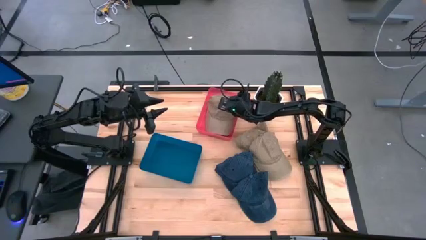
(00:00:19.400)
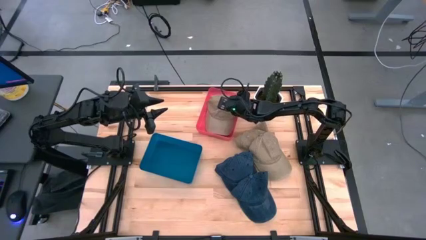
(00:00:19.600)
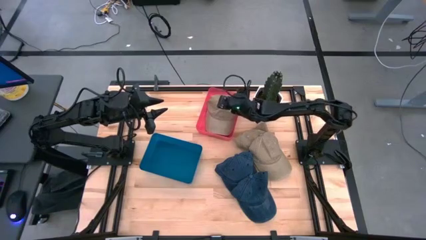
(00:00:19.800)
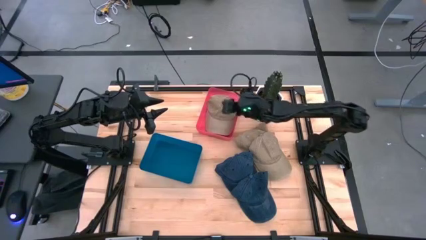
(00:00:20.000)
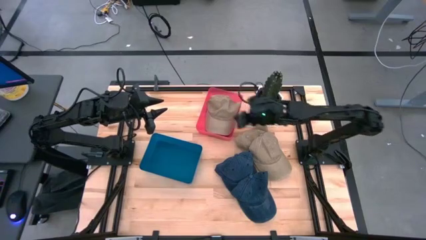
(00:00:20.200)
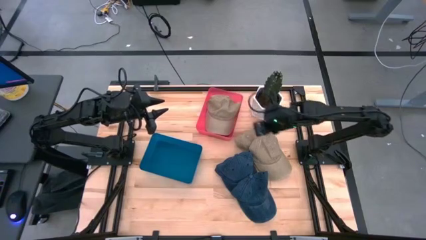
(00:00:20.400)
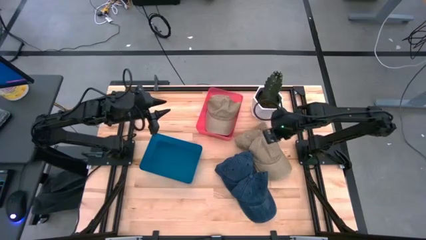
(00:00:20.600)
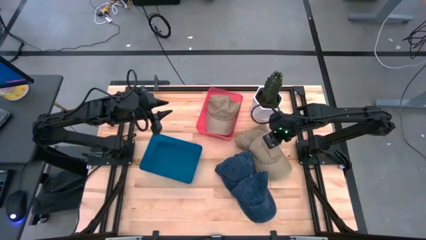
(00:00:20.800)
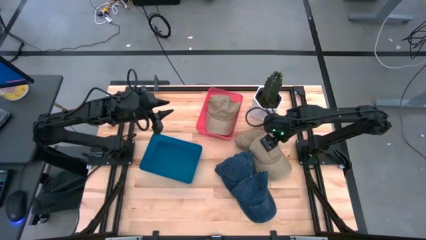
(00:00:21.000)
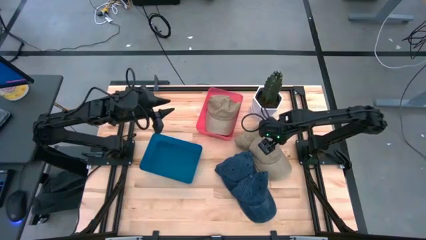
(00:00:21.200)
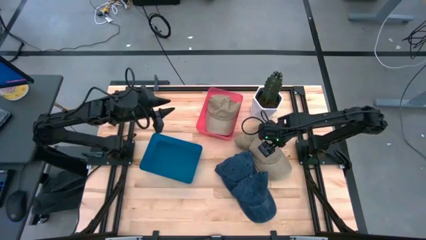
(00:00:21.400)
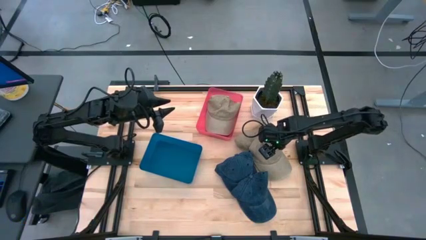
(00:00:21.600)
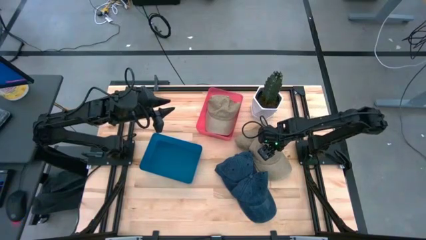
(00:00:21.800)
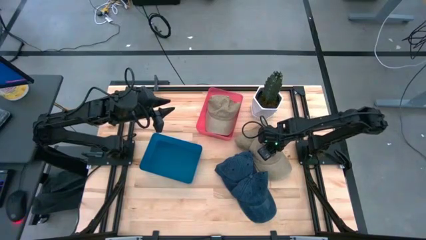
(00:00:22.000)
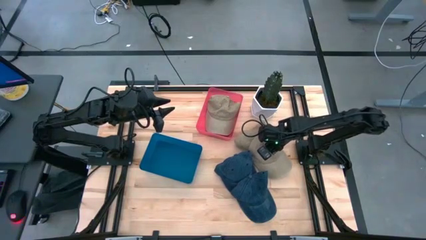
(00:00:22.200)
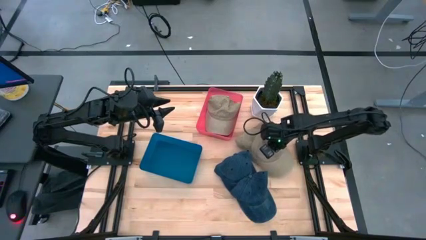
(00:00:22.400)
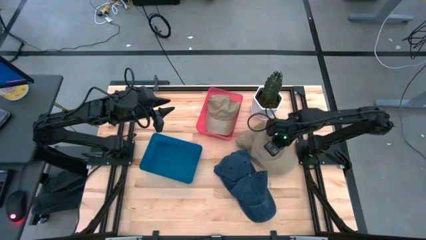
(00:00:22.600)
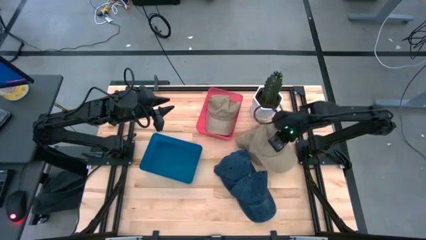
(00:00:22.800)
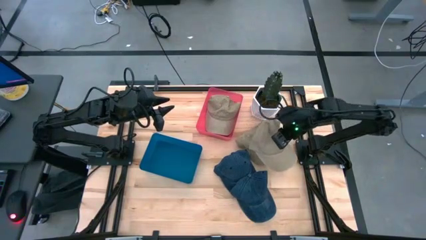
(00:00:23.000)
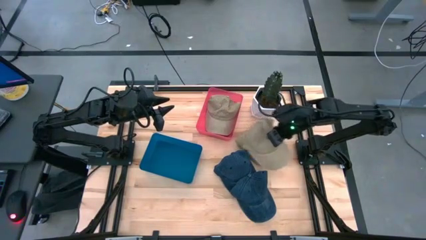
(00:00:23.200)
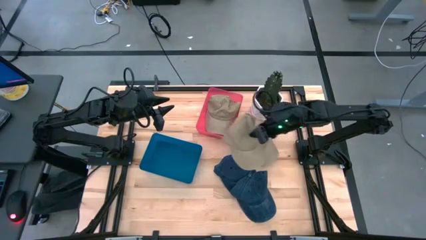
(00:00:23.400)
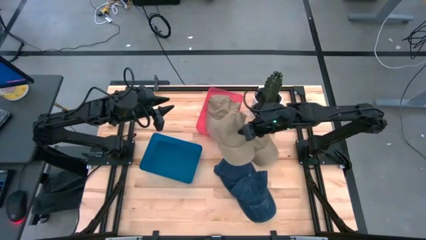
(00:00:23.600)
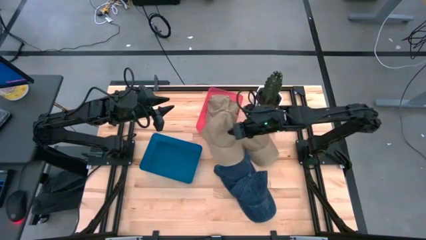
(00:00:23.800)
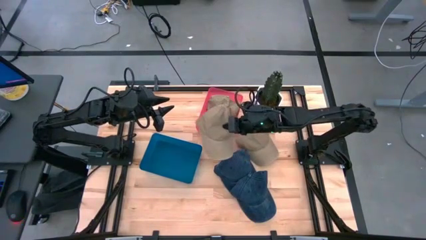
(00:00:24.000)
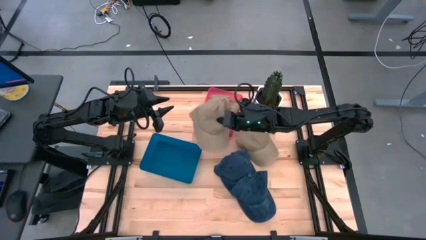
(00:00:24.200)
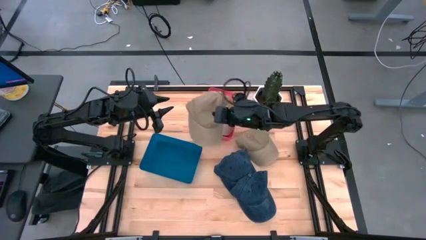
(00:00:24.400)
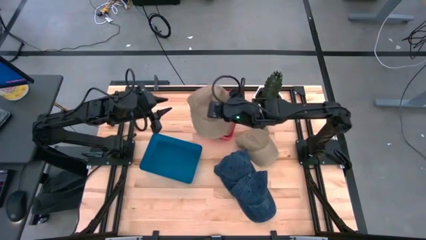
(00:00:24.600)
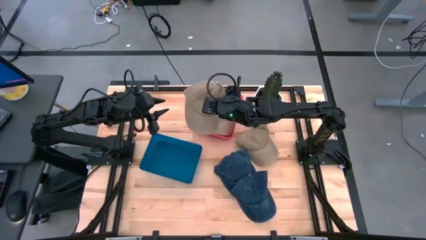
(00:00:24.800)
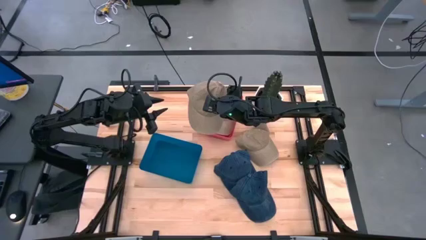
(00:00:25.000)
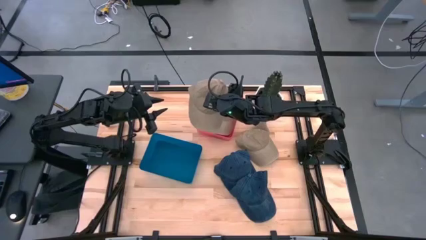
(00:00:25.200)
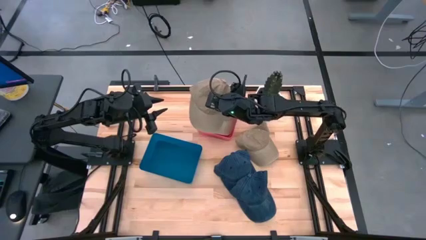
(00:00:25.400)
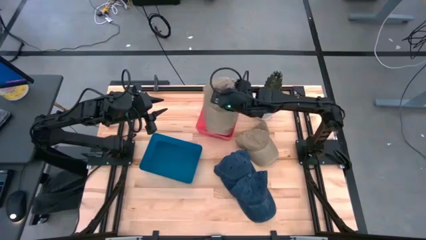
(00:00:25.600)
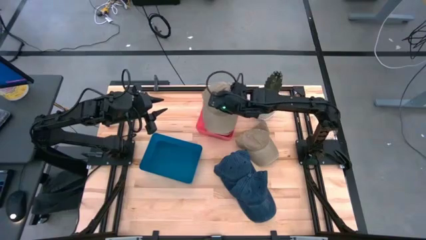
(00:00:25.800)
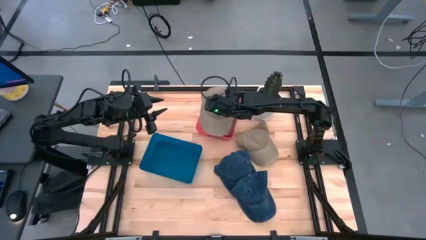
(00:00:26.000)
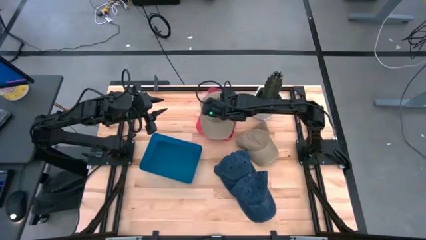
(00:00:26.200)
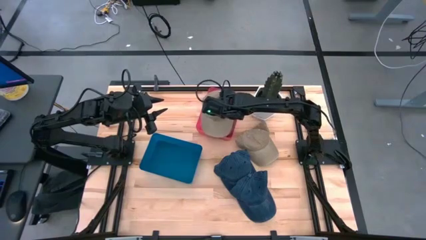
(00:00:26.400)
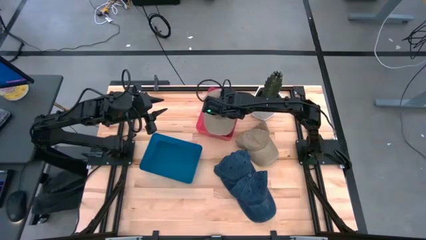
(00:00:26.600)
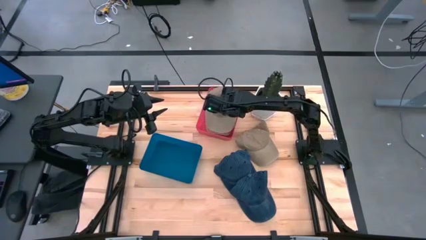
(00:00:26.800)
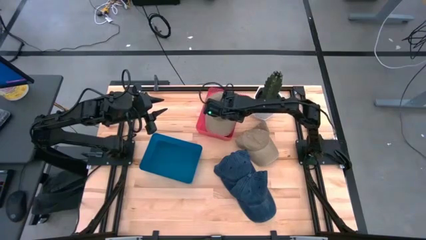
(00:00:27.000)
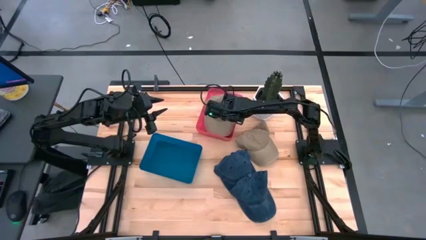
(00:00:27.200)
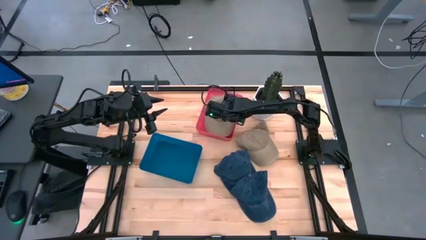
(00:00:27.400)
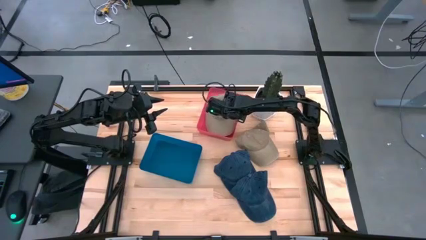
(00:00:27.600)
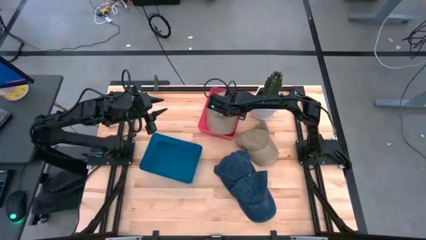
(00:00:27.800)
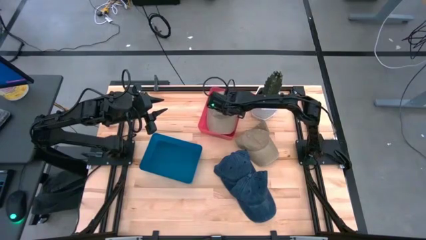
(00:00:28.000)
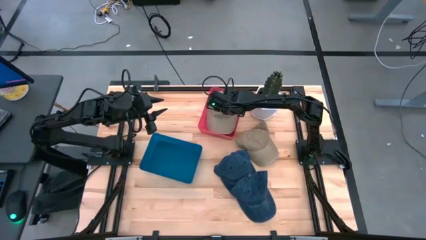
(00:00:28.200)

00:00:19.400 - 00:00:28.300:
Task: Pick & Place hat
Put the bottom brown cap into the pink bin

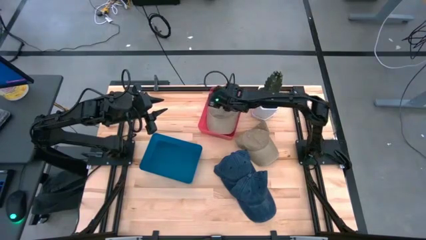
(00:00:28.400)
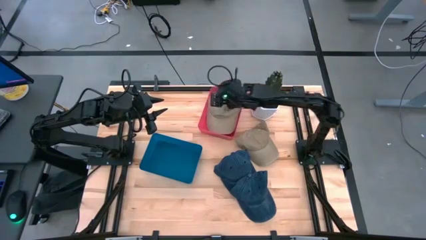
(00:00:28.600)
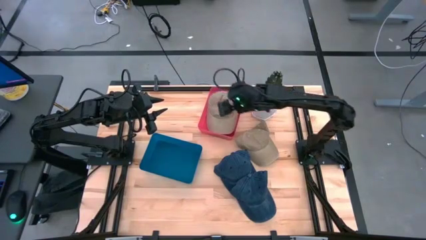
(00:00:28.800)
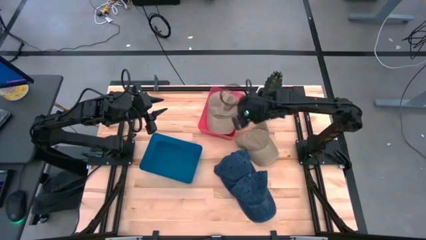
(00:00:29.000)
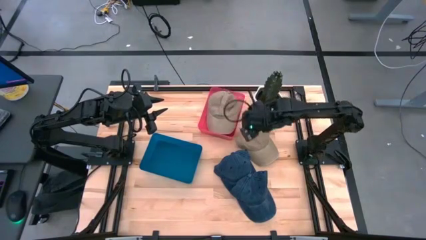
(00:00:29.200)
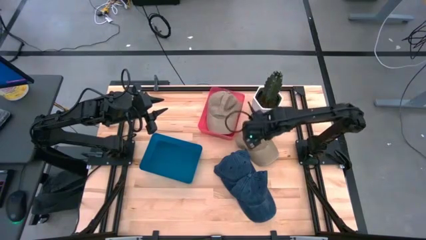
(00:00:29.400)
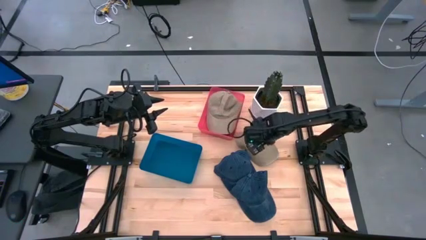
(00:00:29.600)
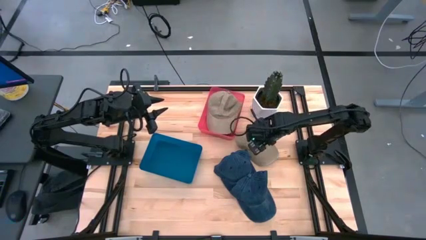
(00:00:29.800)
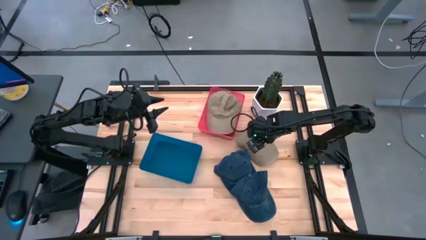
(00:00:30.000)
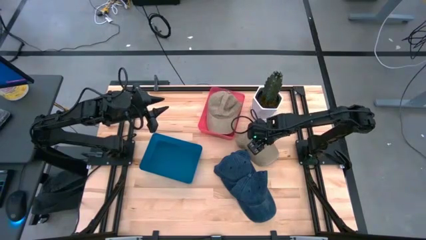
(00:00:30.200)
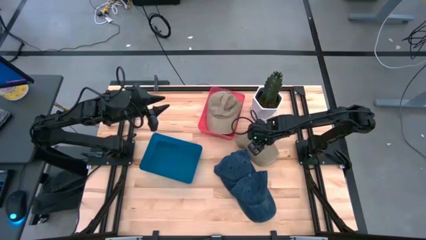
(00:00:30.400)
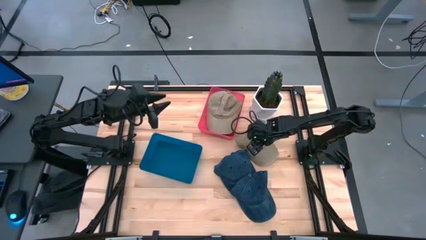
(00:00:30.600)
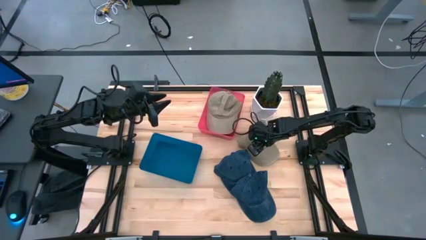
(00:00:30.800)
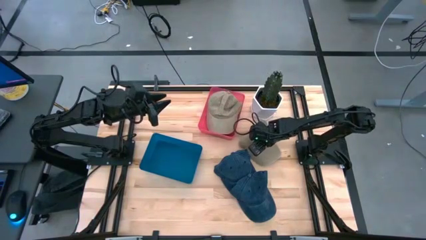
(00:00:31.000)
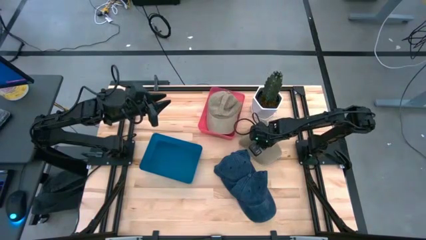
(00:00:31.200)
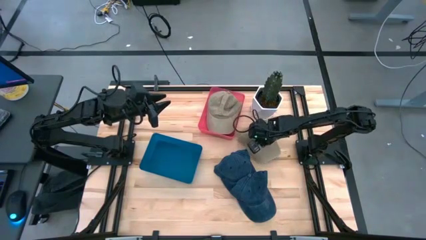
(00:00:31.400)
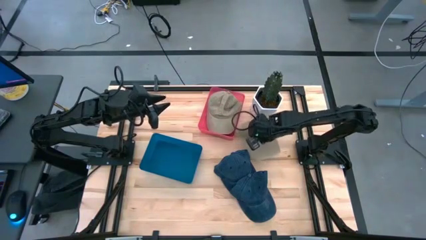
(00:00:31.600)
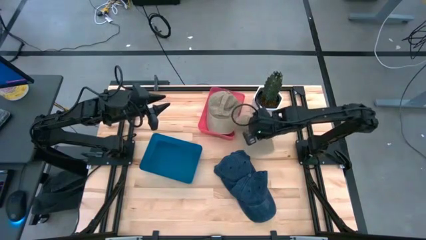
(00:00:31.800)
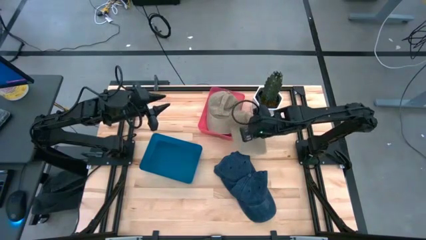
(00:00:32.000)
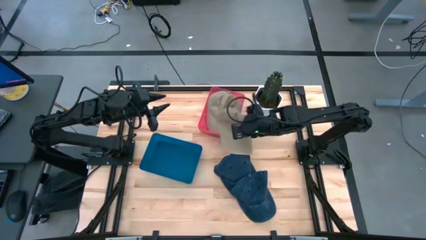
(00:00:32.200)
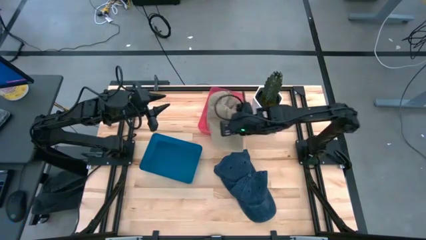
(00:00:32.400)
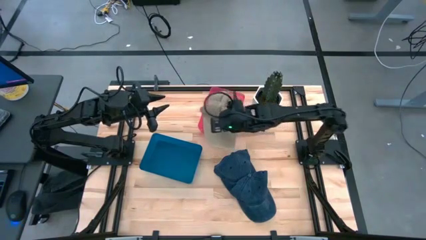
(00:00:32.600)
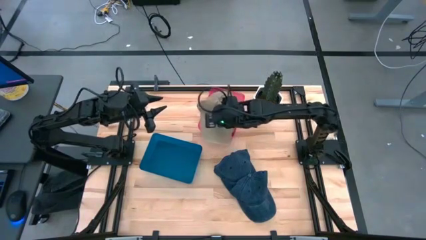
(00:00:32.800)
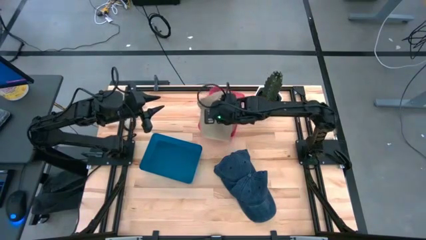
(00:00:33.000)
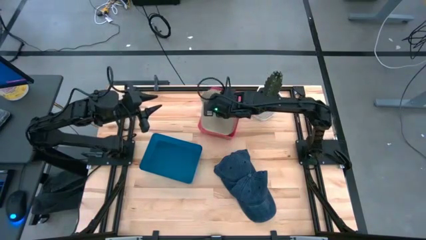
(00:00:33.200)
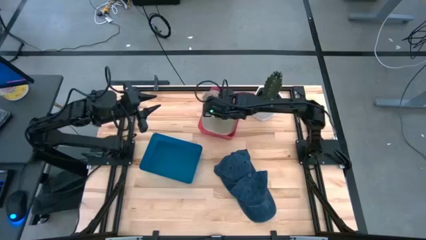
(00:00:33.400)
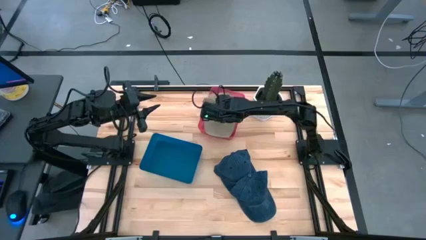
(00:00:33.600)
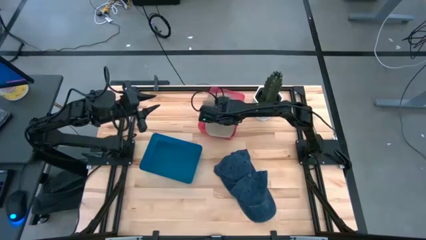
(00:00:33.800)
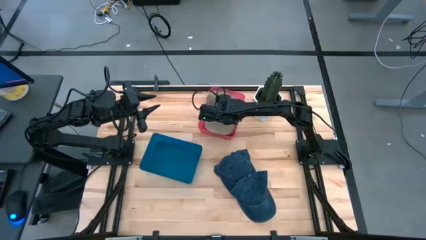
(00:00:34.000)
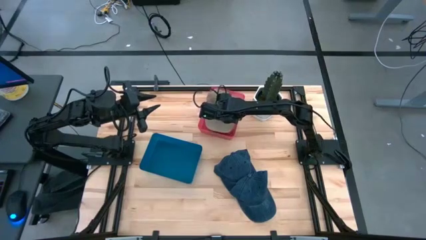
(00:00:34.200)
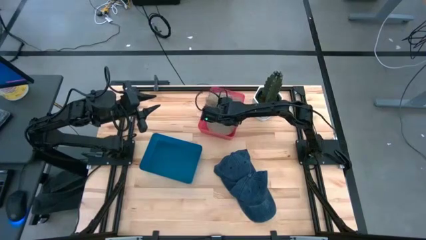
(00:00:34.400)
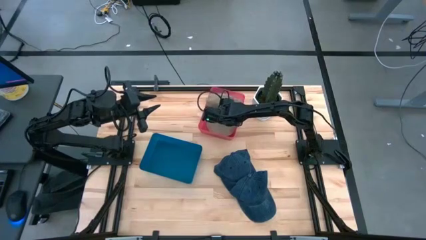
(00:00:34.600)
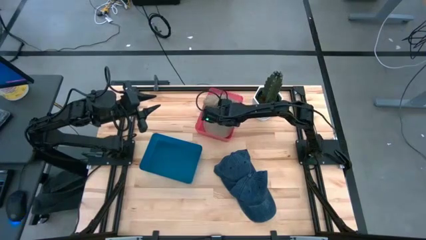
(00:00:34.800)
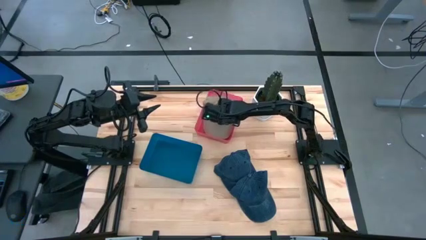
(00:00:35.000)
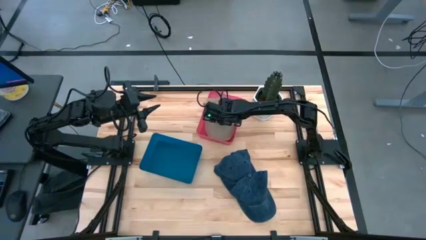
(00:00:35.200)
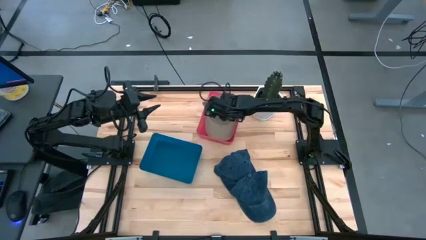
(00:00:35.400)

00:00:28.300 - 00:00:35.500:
Put the brown cap into the pink bin
